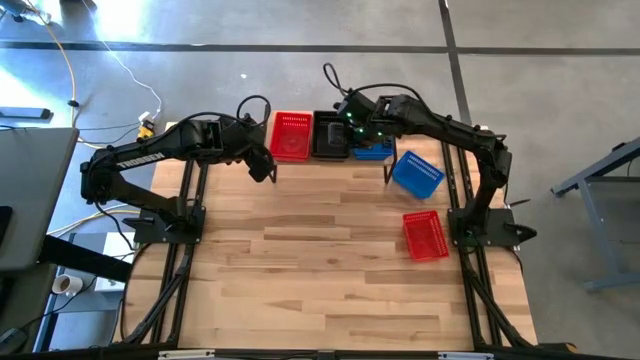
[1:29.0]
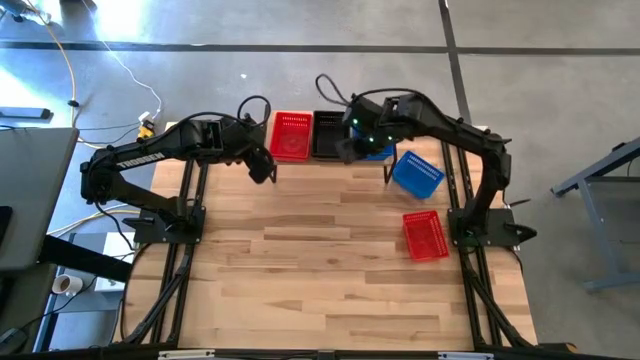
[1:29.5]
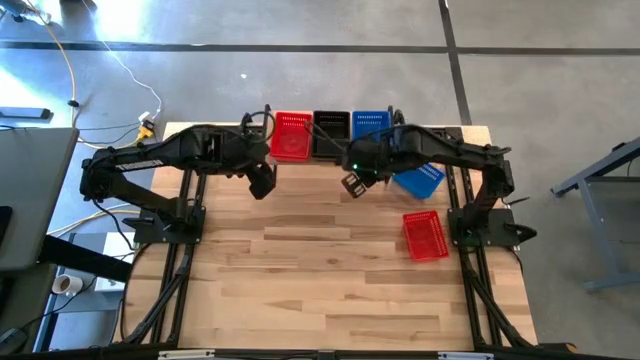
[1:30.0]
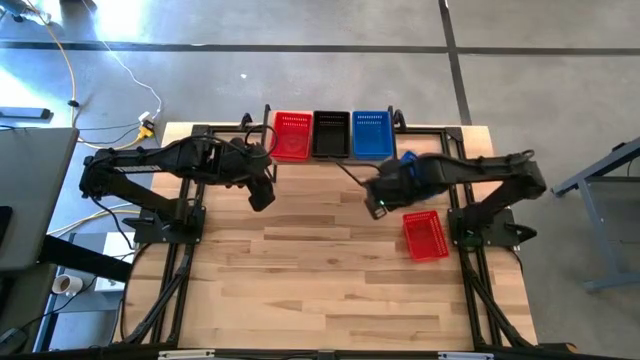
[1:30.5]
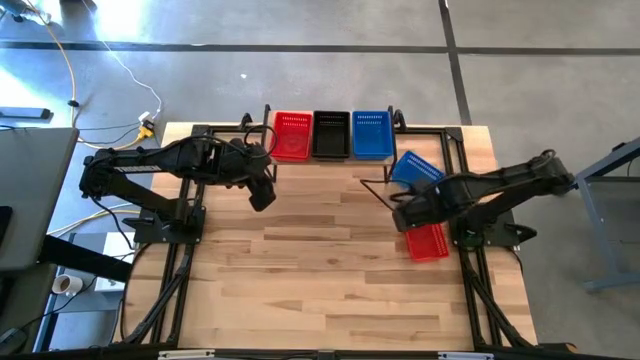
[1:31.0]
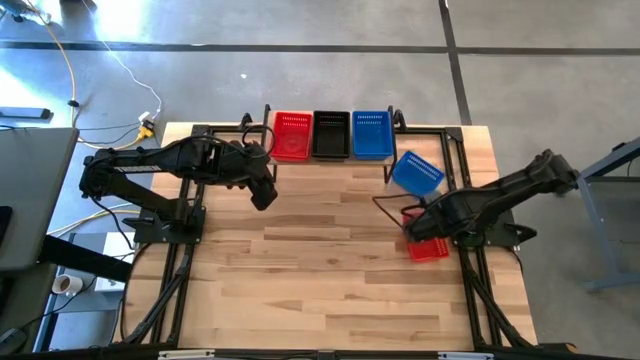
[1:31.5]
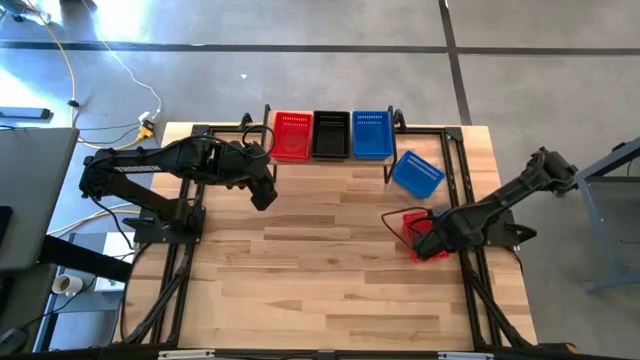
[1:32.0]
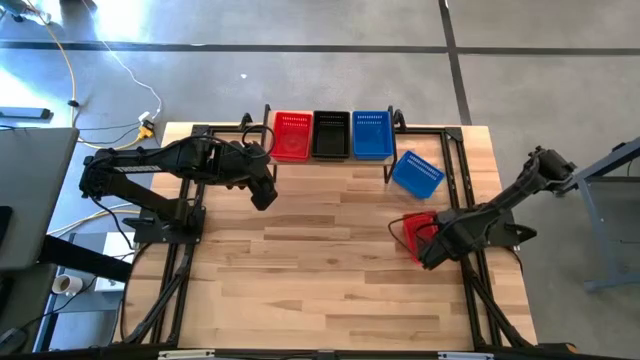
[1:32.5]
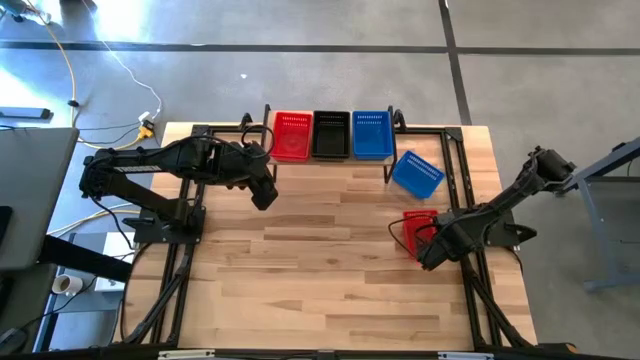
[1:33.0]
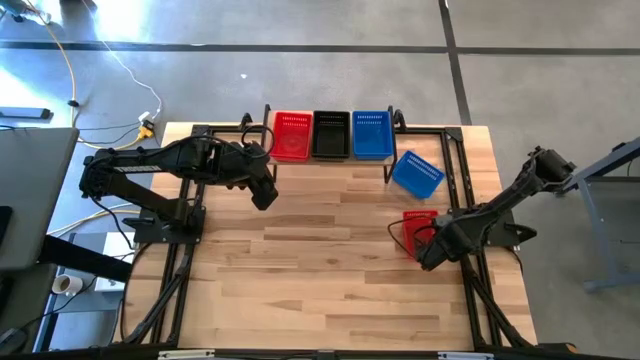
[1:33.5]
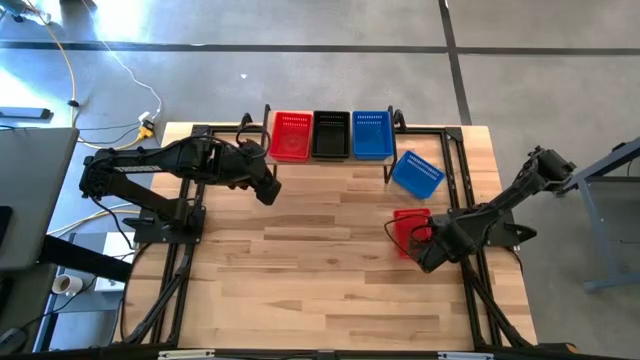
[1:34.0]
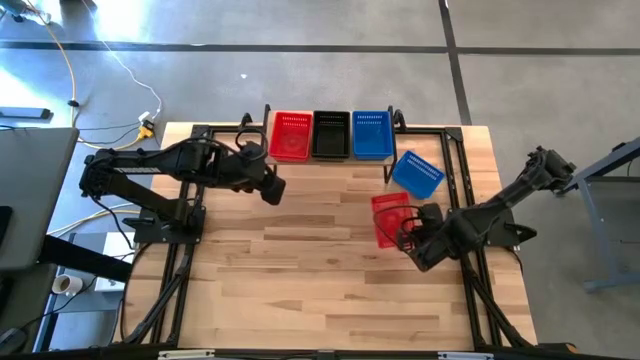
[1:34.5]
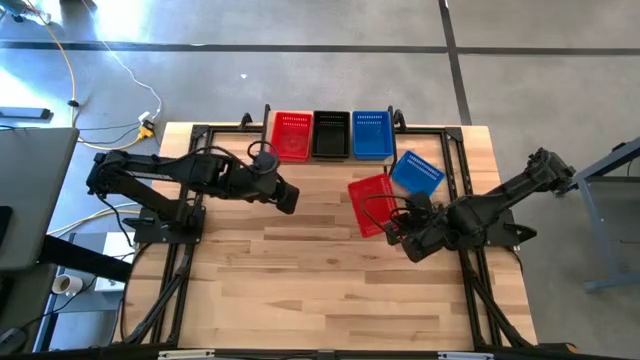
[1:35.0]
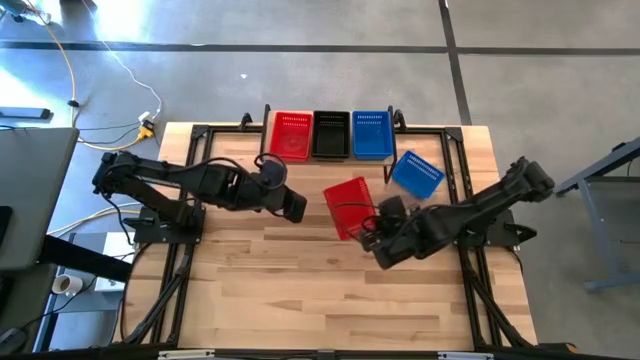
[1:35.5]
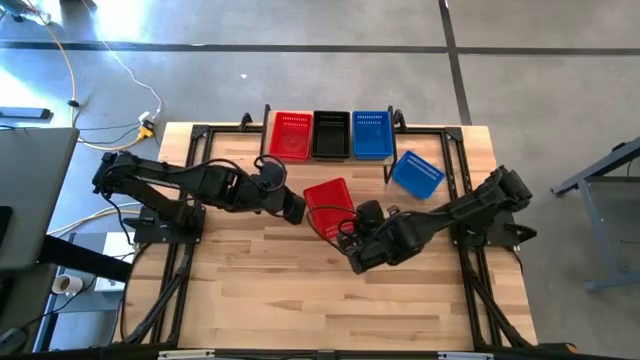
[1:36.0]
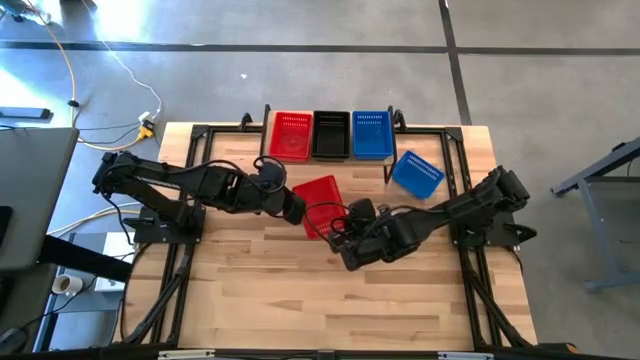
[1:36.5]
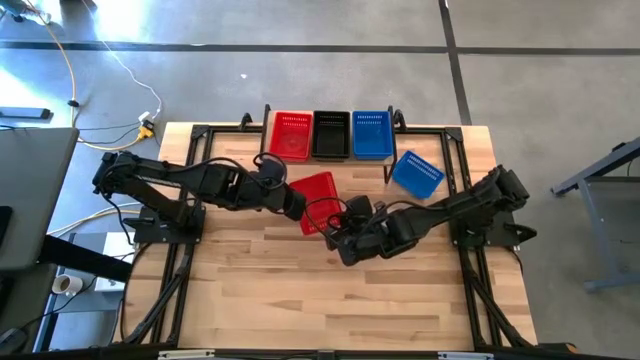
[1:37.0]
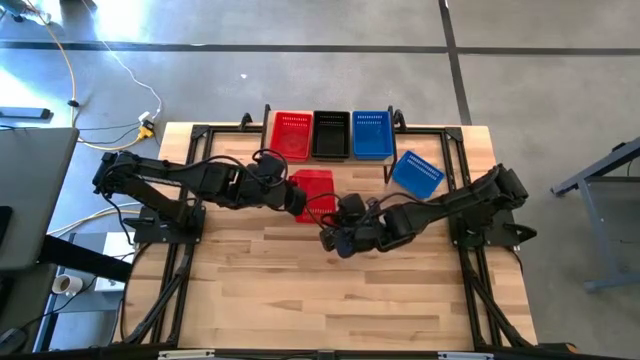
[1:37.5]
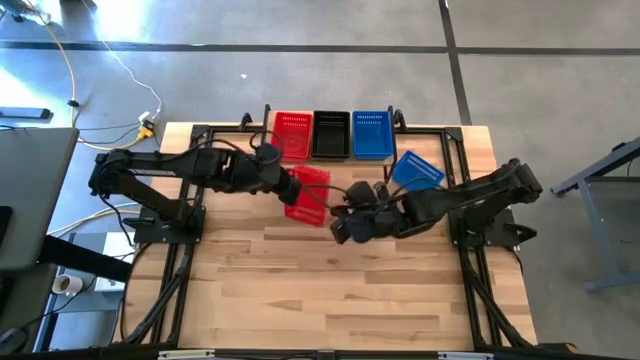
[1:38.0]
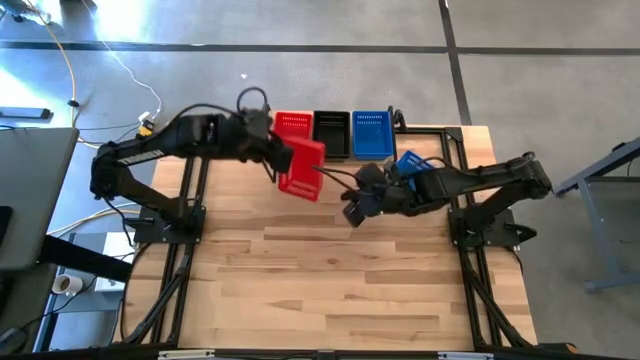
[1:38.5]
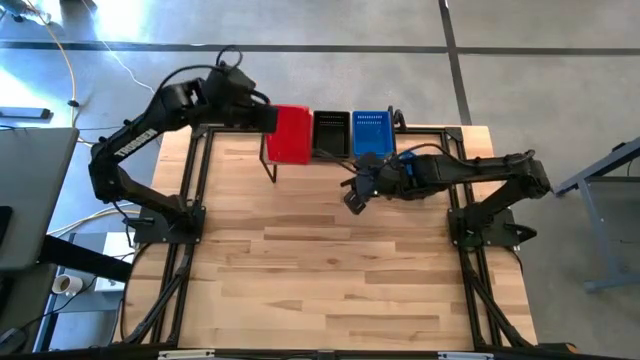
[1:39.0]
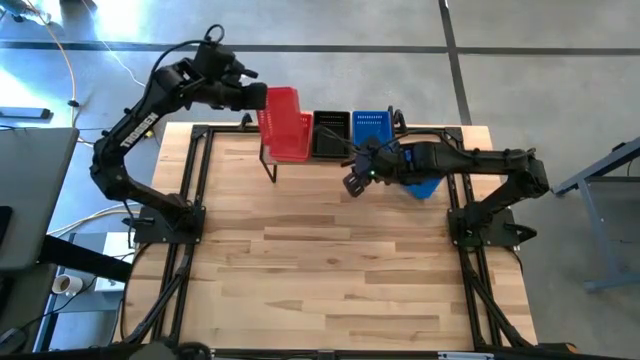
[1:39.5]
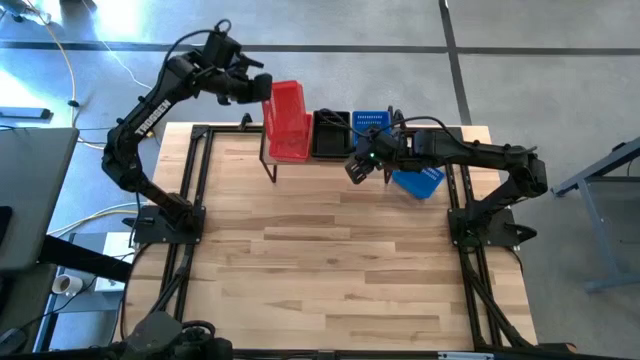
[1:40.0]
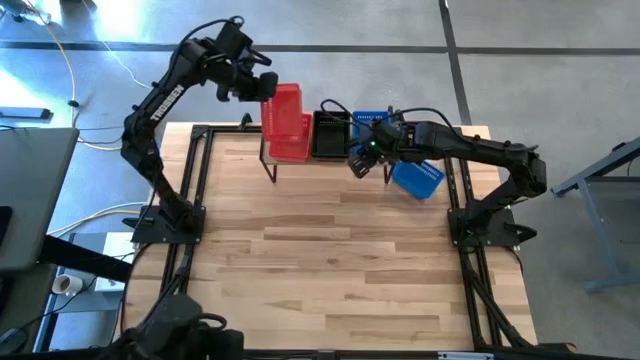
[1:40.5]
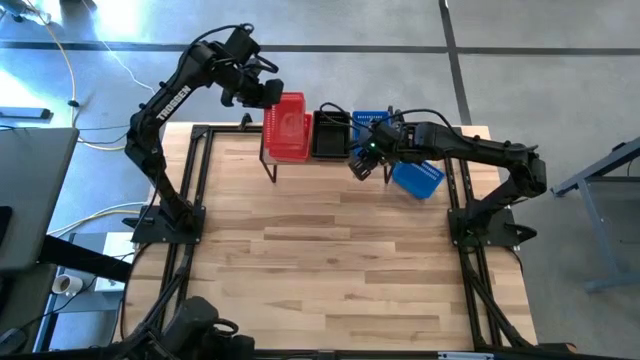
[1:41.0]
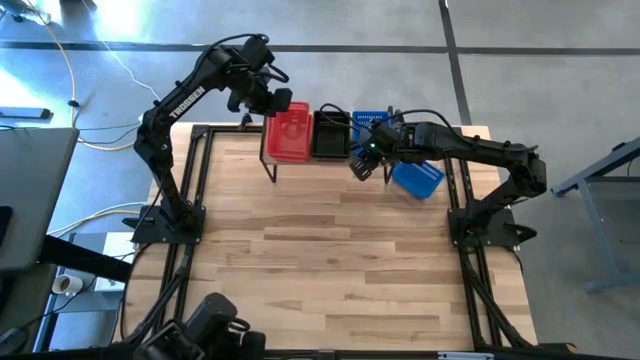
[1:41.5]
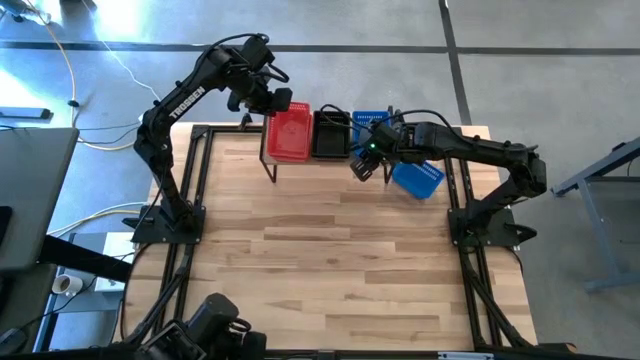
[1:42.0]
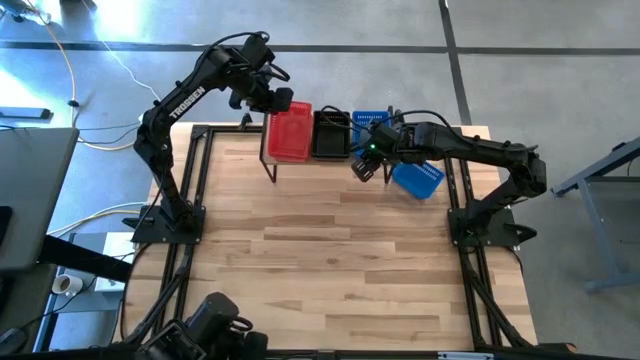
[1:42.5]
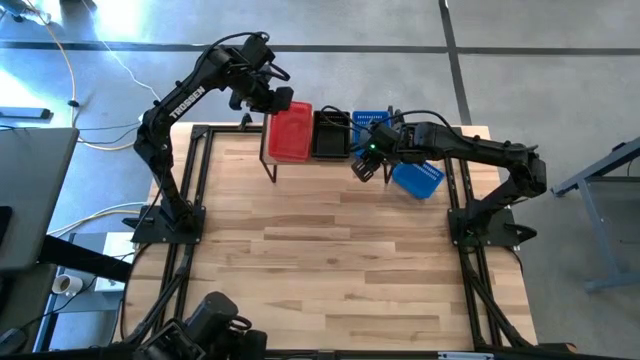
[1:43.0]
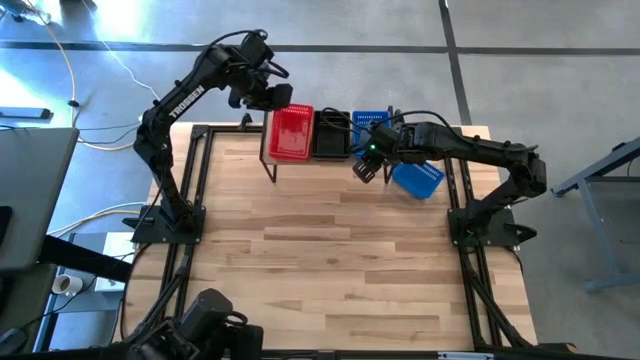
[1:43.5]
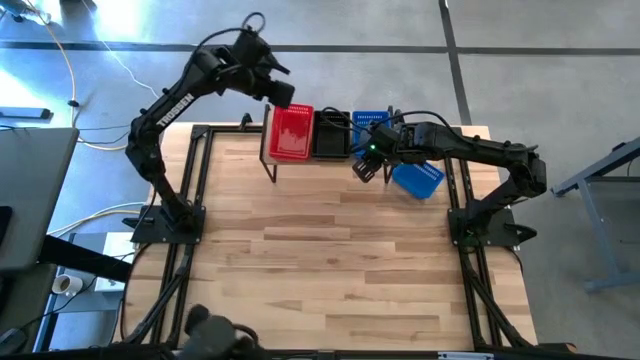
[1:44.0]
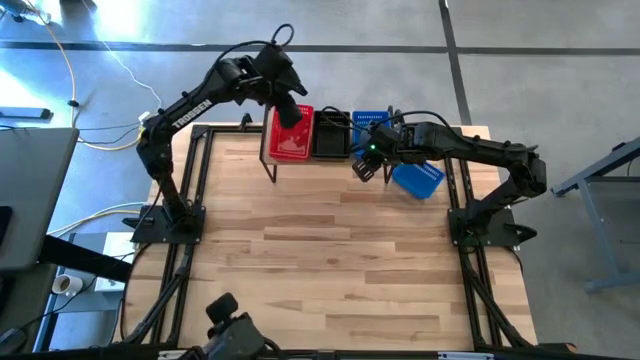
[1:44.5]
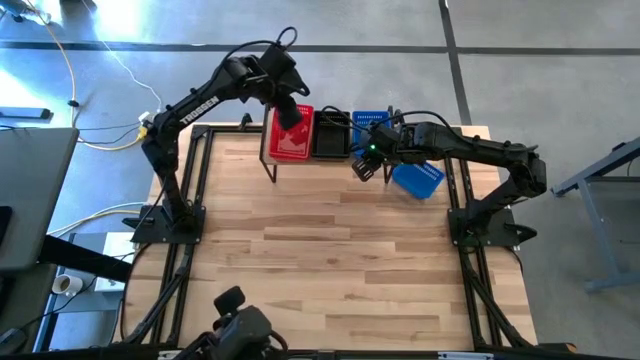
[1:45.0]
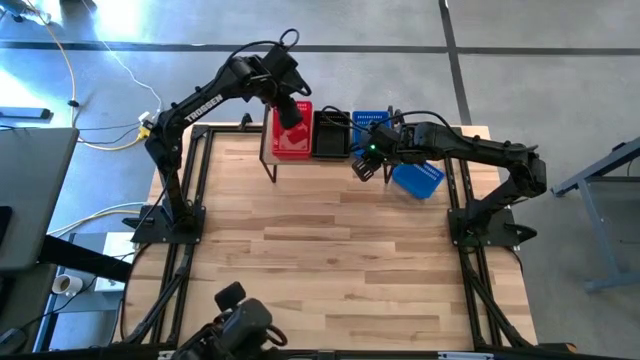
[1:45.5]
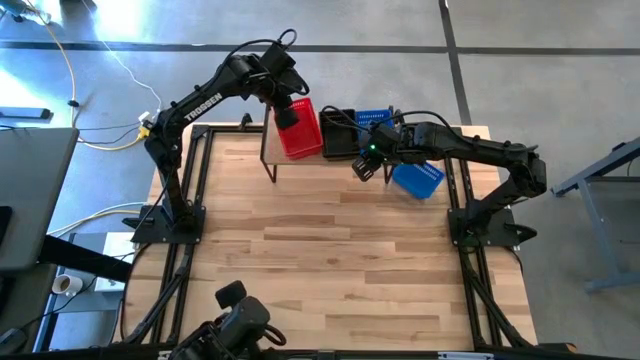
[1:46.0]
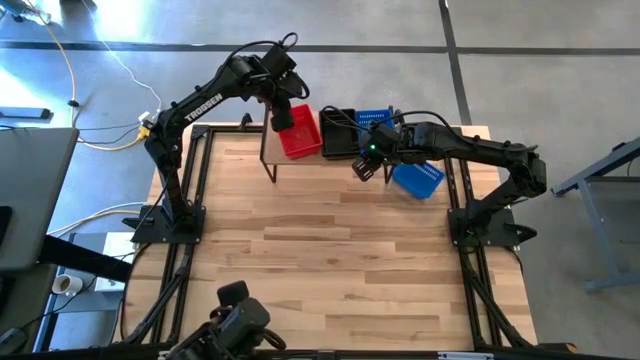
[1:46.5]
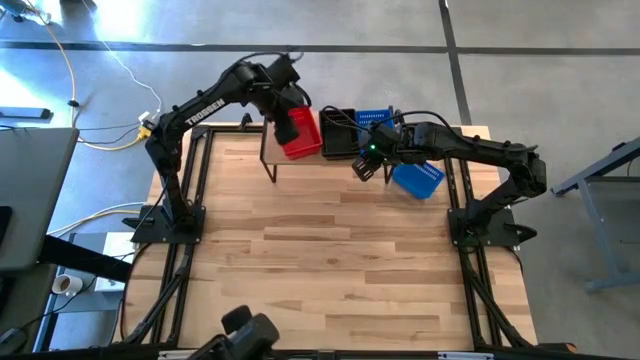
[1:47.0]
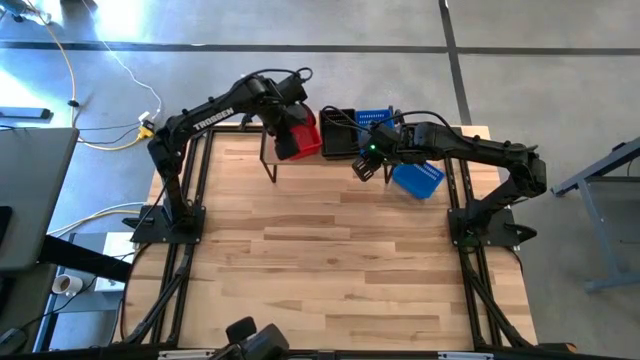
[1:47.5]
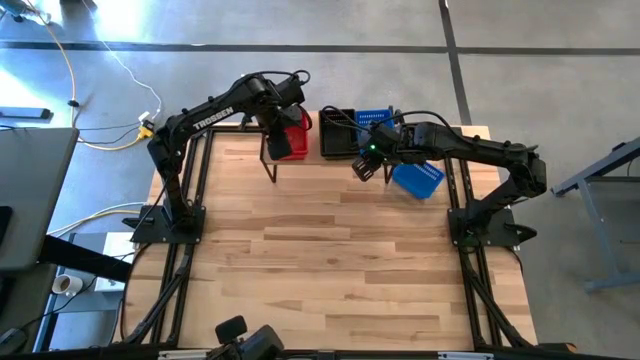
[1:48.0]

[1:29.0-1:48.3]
Task: Stack baskets on shelf by color
Stack the red bin on top of the red bins on the shelf

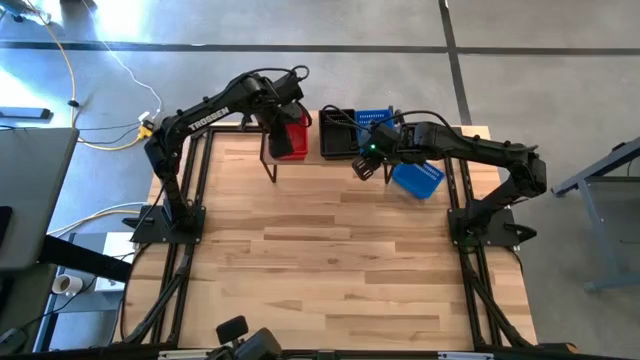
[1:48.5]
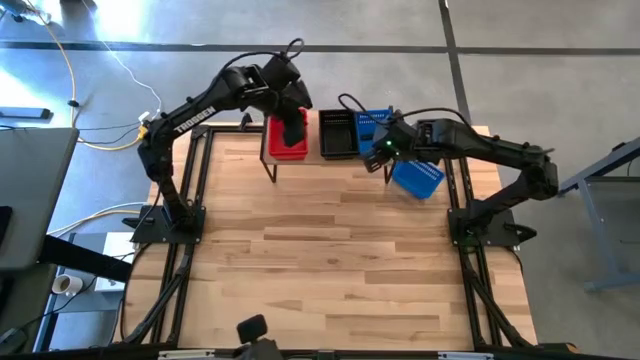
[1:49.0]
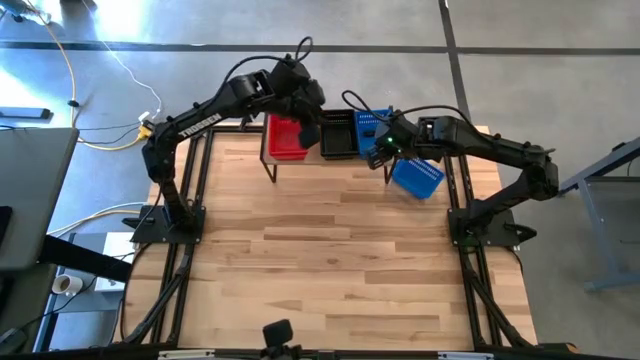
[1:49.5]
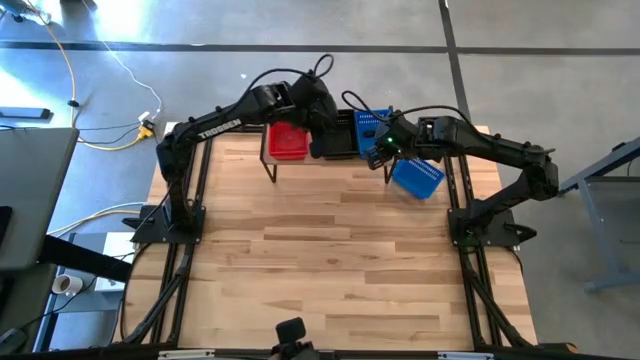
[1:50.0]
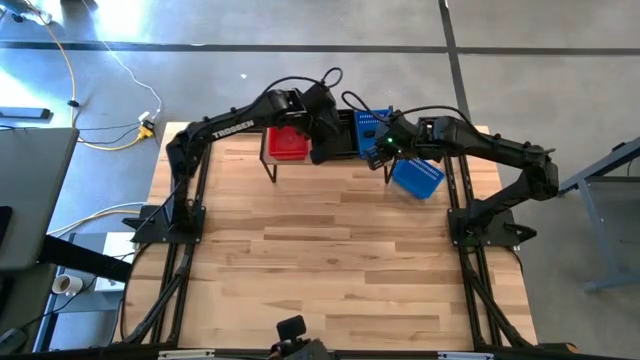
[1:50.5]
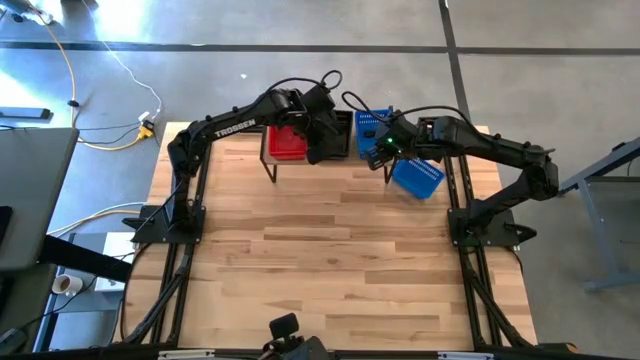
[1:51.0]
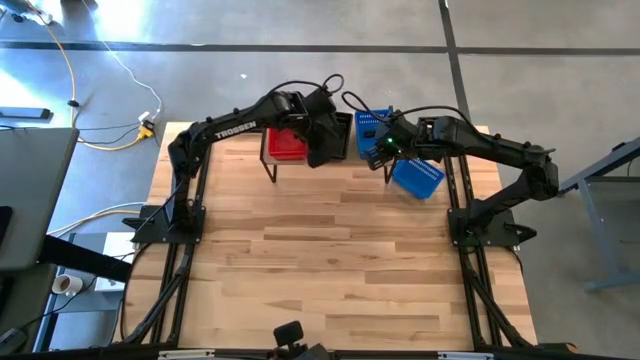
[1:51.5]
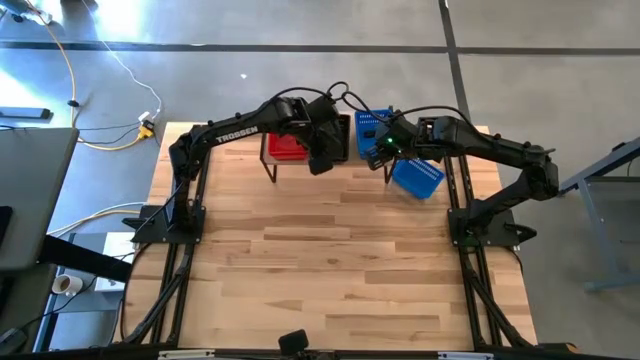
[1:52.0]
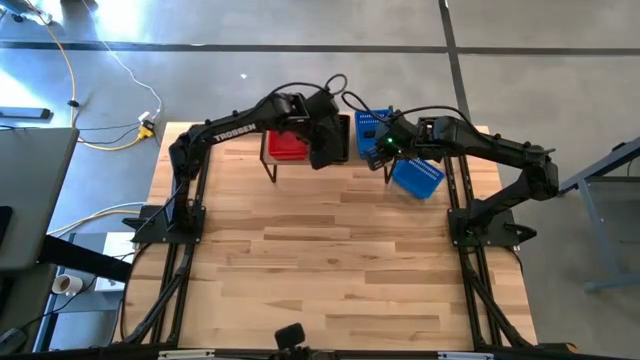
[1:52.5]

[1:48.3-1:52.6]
Adjust the black bins on the shelf
